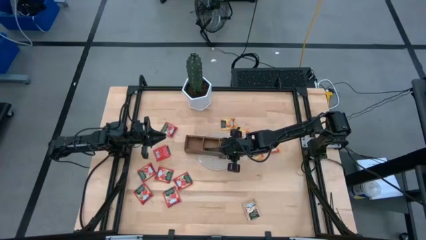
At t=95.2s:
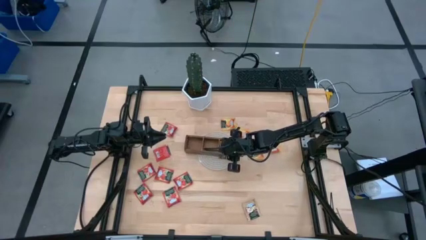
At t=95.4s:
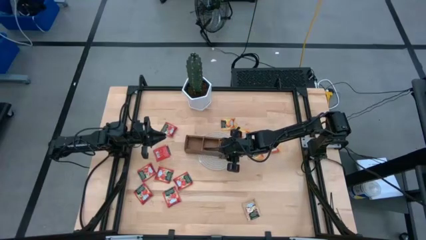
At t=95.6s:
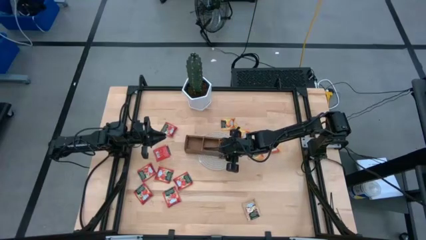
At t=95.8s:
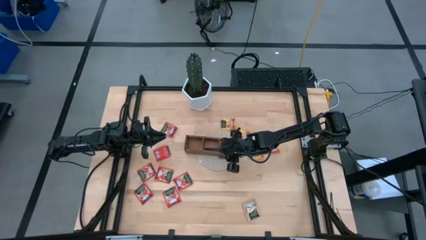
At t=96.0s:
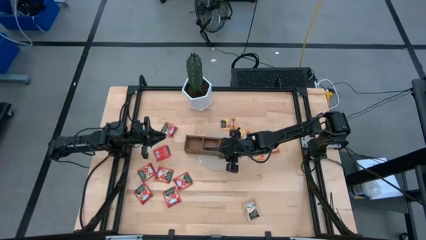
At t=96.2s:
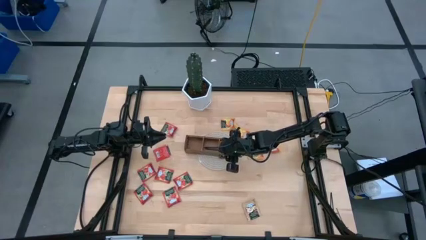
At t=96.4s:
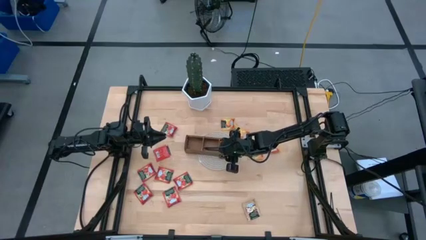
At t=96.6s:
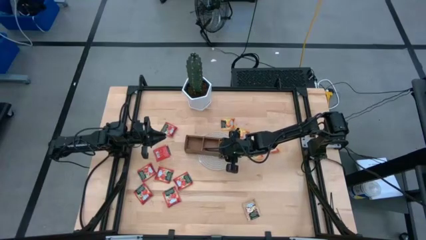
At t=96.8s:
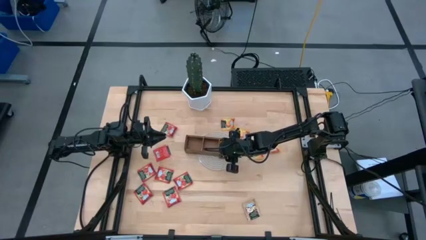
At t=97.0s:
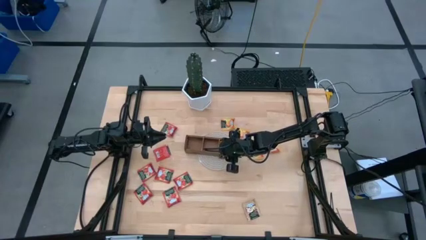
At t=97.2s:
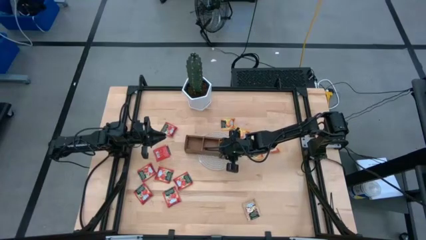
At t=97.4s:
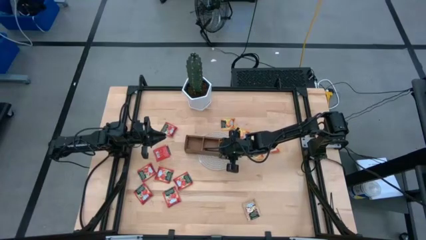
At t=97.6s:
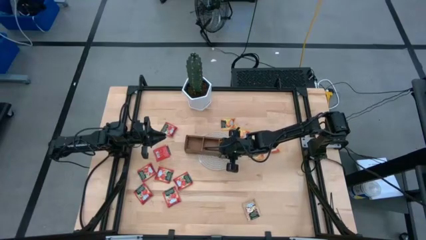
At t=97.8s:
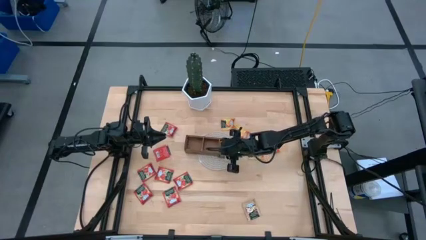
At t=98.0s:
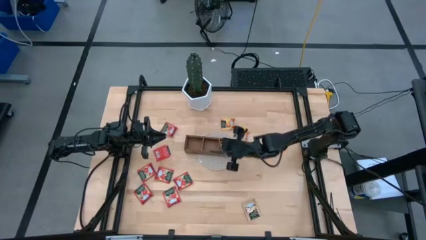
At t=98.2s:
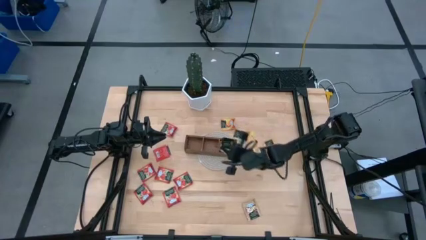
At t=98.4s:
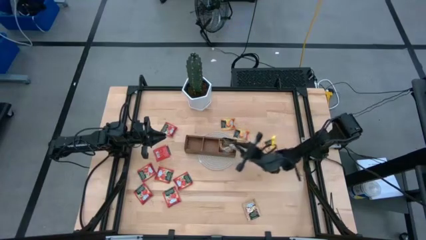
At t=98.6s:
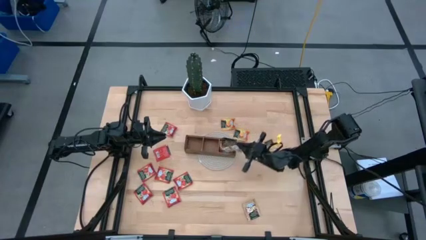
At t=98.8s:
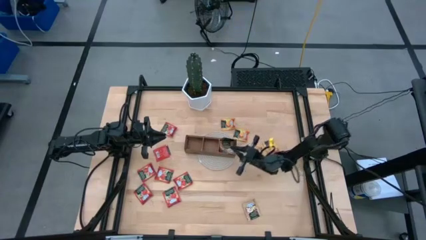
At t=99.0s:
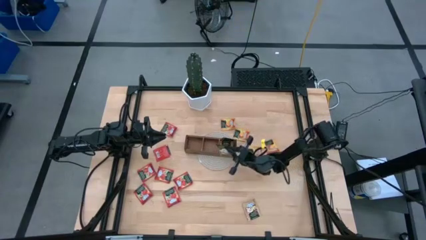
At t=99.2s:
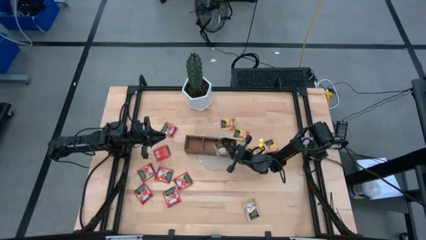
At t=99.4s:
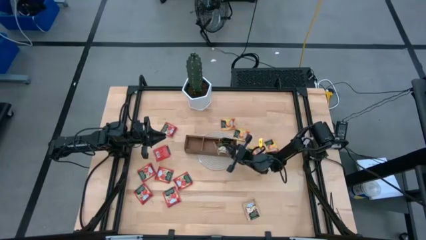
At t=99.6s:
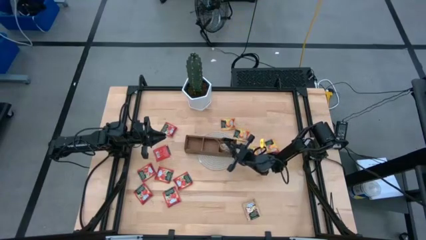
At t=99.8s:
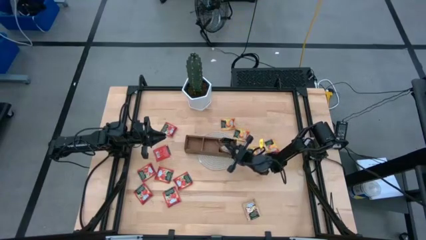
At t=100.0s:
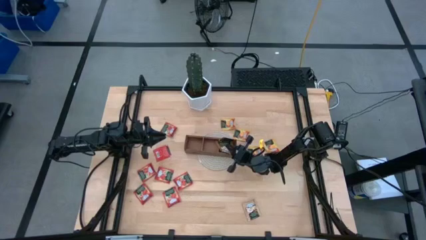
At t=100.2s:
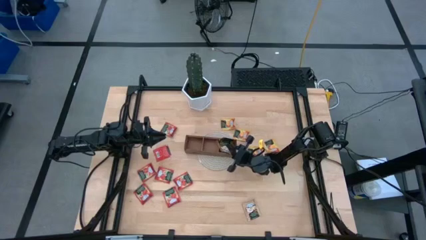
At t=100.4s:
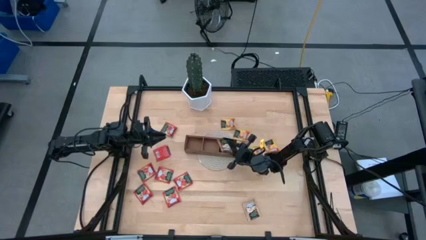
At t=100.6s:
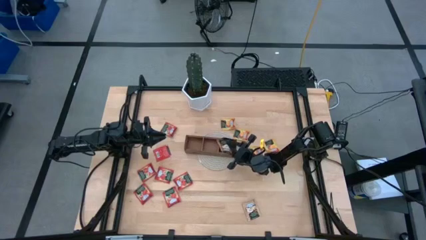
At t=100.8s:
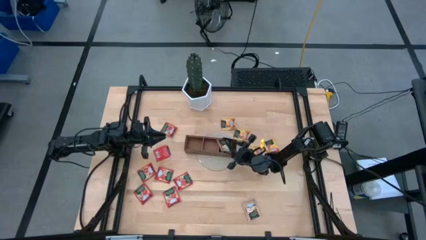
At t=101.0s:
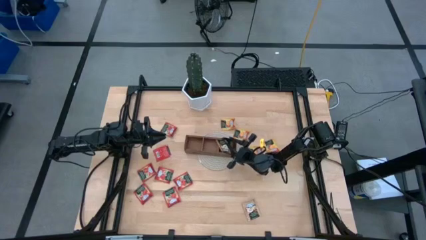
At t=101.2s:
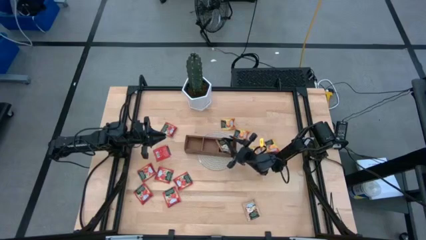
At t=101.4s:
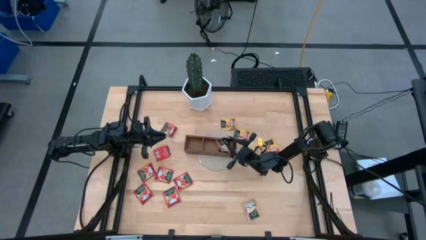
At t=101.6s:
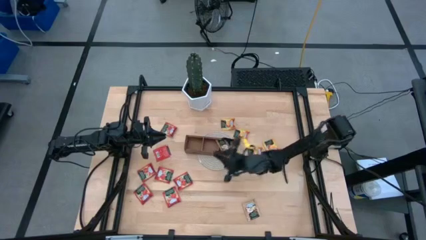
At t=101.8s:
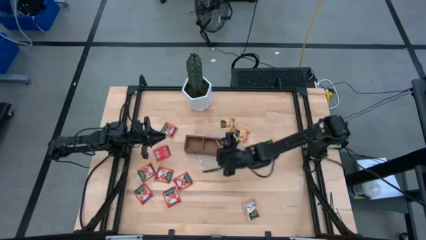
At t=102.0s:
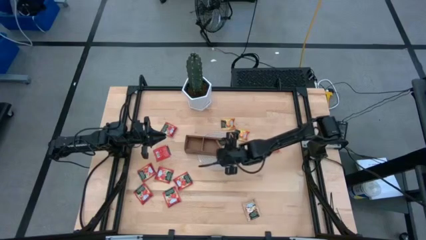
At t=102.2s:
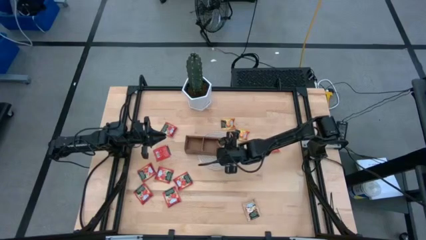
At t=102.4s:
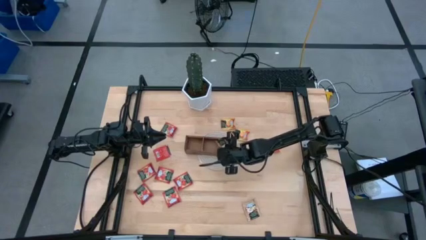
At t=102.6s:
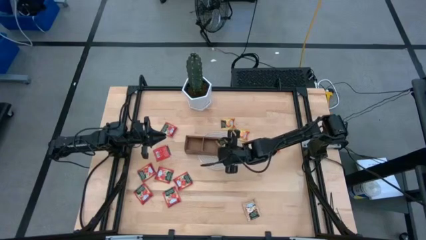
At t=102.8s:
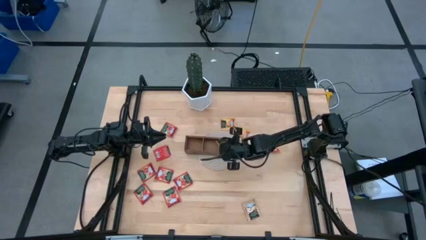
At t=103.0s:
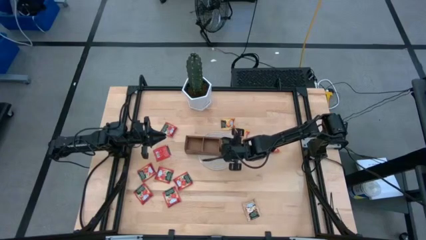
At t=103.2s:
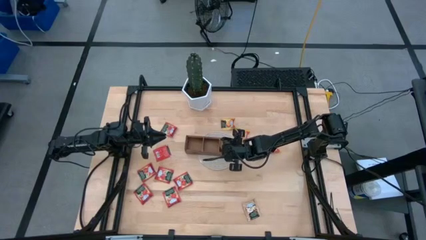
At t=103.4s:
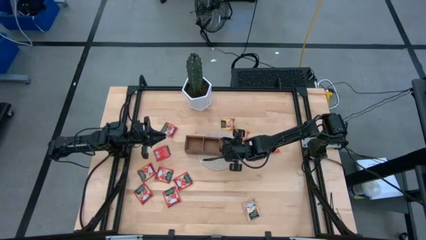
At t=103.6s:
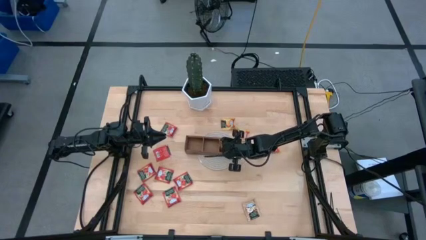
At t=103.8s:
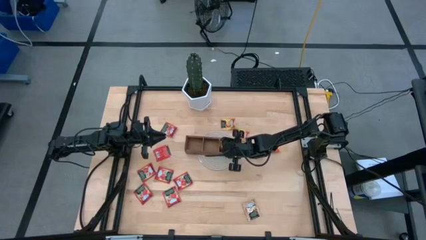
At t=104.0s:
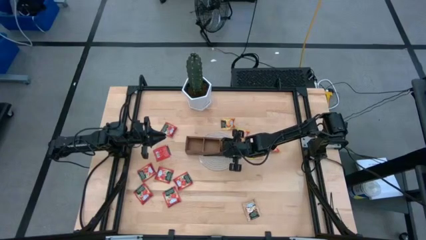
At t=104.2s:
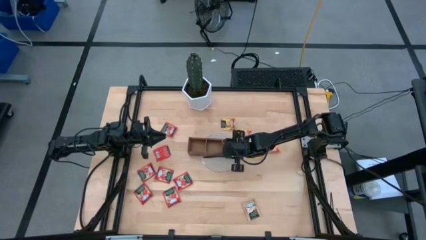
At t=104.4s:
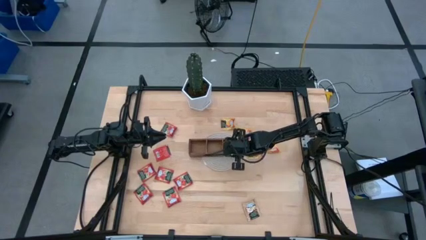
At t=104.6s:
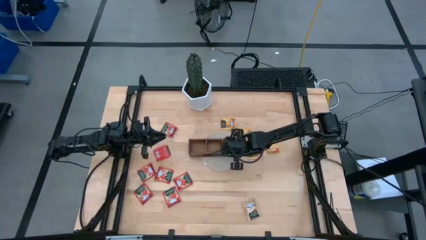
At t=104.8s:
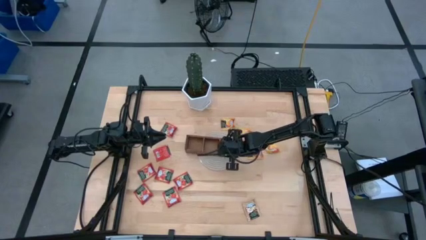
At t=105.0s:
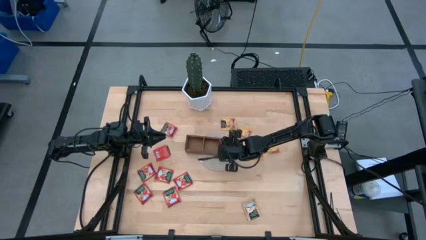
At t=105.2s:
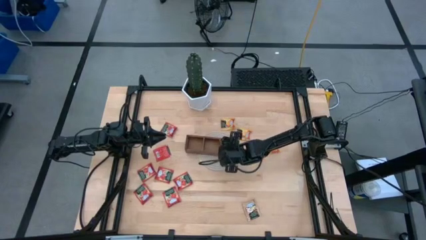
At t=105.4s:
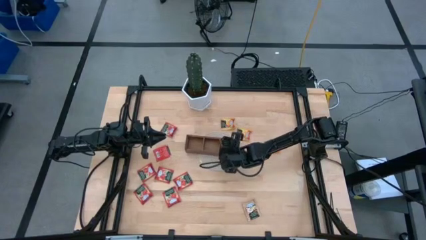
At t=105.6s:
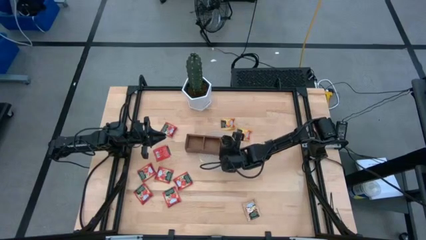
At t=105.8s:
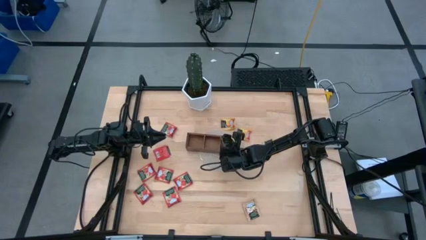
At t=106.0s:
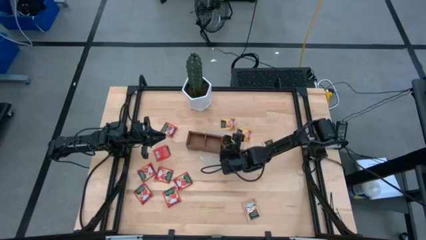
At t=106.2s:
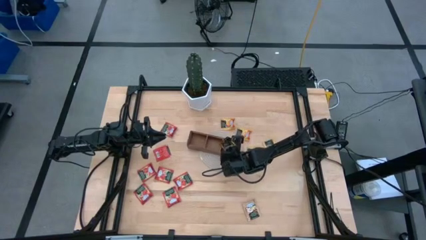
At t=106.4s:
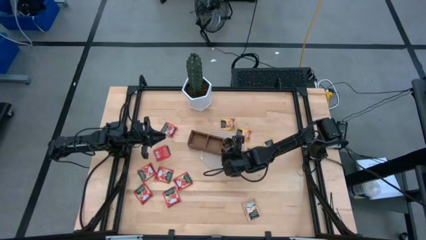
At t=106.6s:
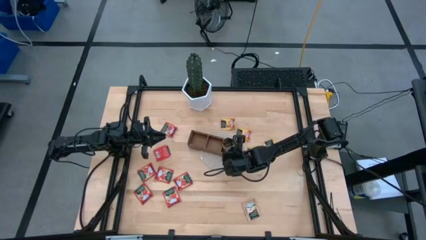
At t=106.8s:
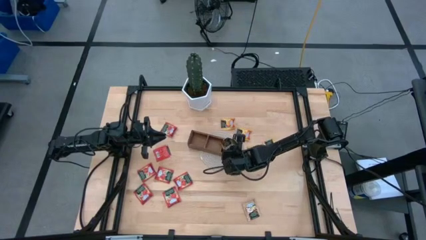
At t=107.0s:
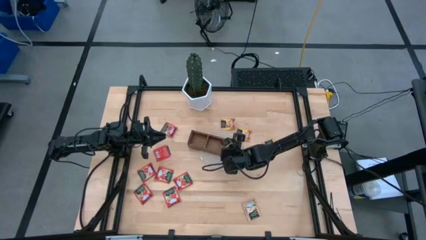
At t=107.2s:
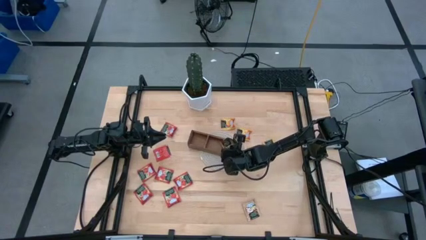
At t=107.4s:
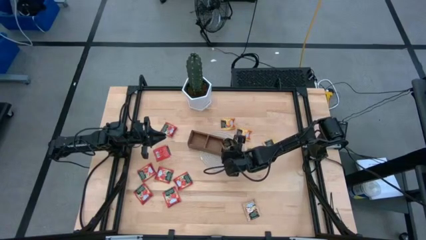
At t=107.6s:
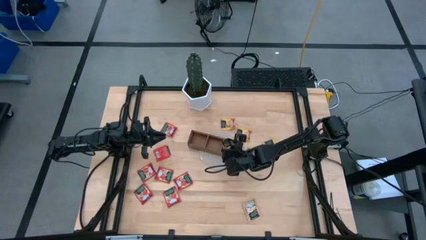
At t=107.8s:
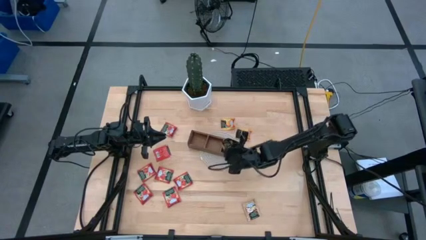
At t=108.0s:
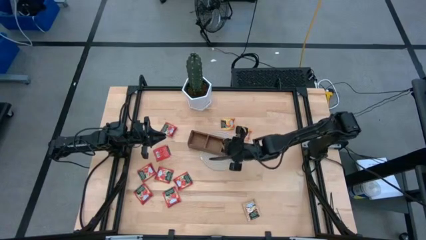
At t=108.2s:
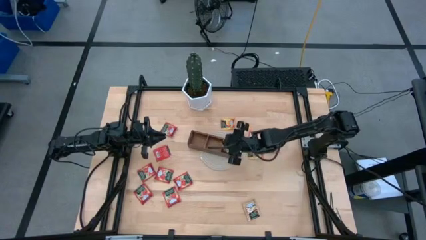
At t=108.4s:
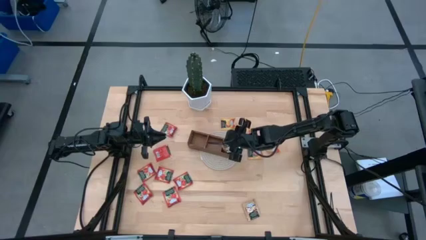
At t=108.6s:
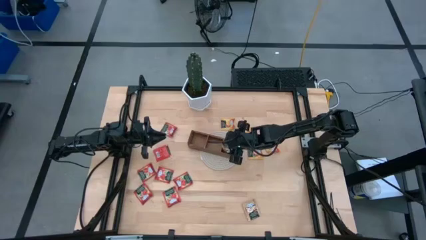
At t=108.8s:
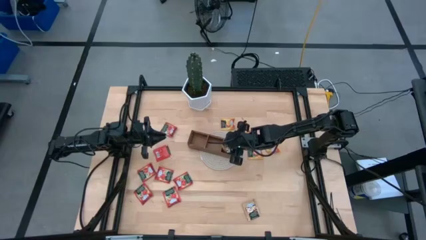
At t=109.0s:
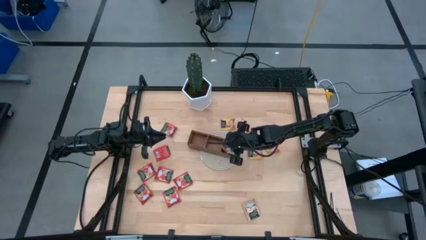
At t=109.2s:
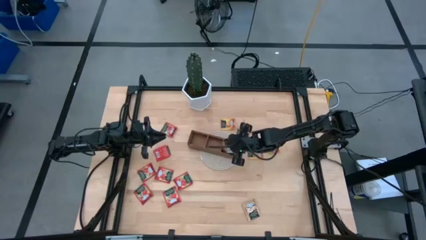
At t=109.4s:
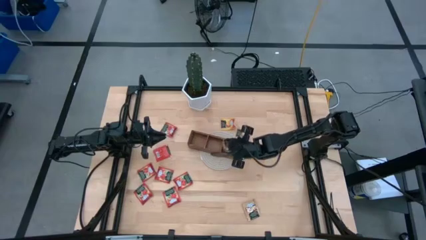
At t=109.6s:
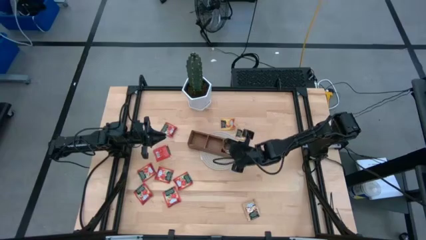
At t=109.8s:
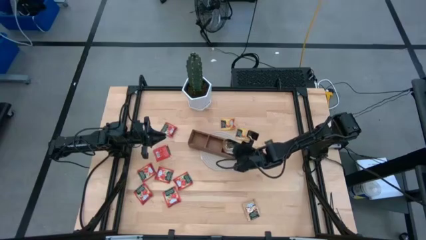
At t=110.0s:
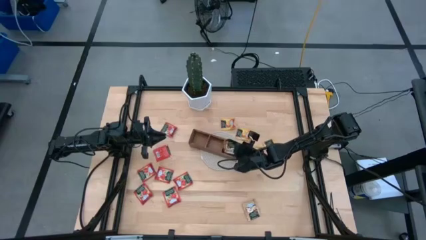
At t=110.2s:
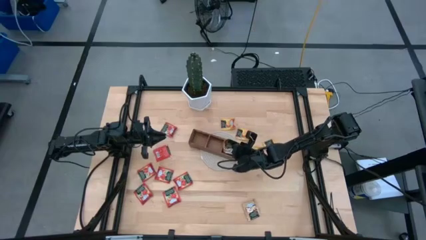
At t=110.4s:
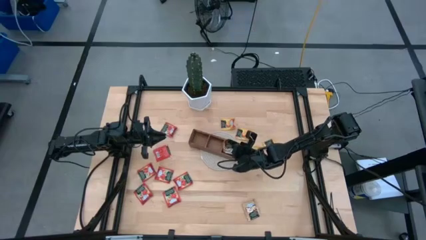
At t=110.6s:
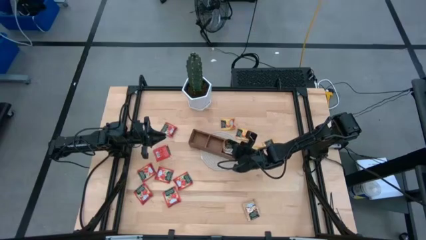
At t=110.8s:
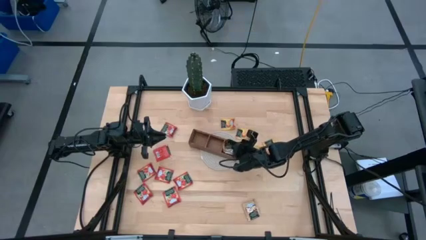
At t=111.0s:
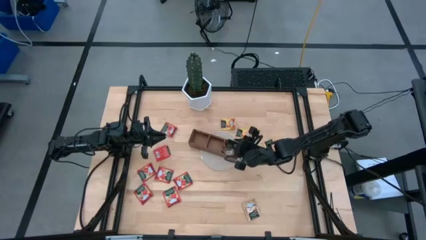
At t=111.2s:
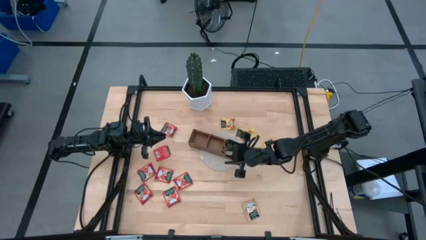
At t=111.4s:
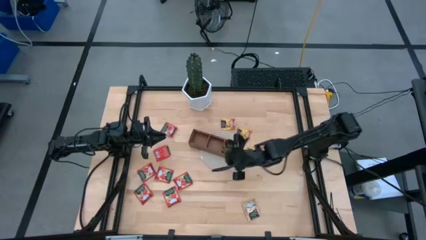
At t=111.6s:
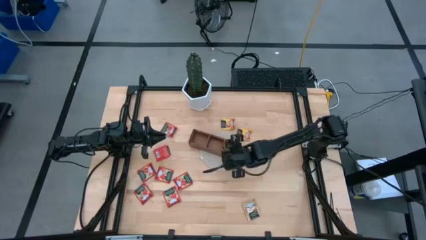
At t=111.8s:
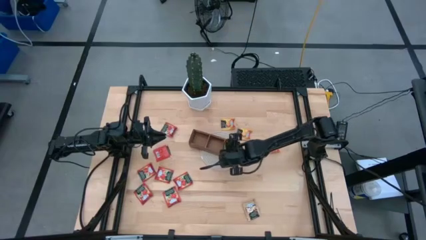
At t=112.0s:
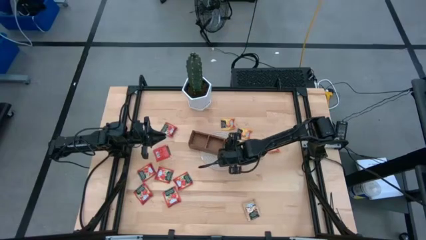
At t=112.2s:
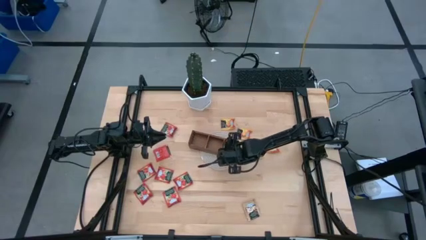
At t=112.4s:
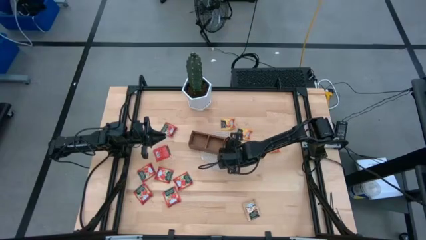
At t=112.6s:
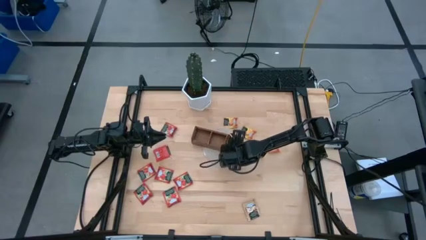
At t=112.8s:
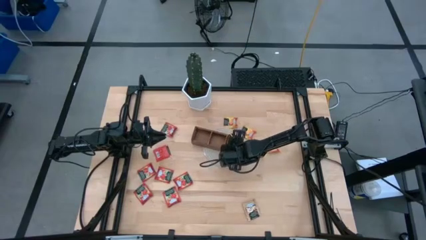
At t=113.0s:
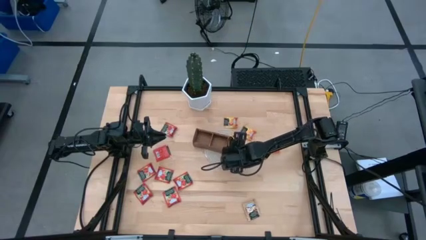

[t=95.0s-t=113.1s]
Task: Pick & Place Tea
Put the brown tea bag into the right section of the wooden organizer
